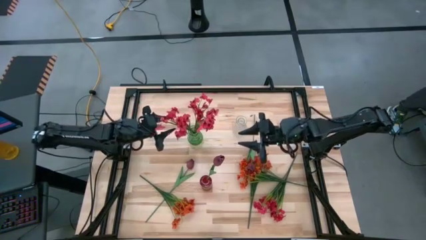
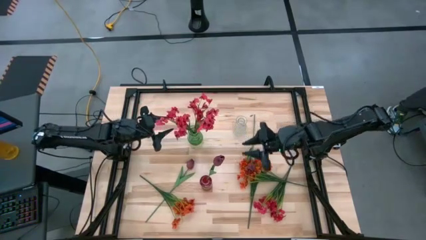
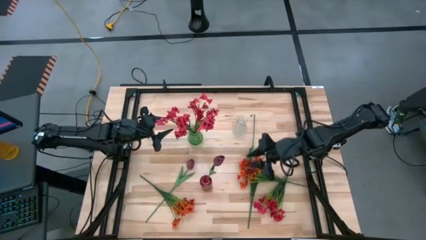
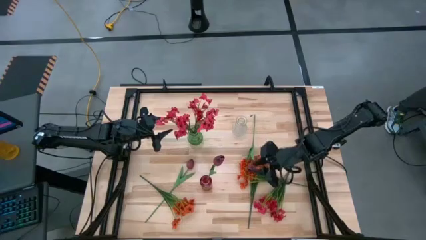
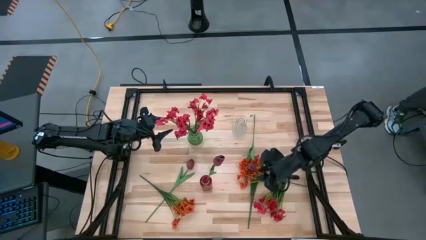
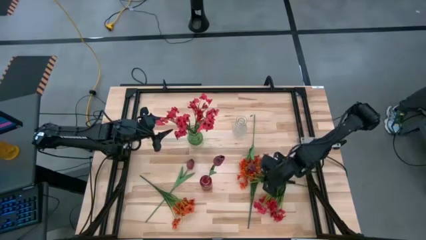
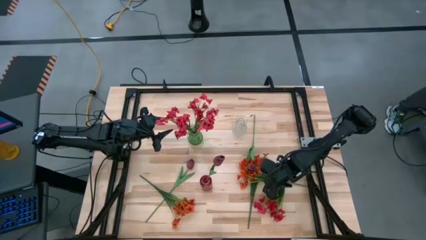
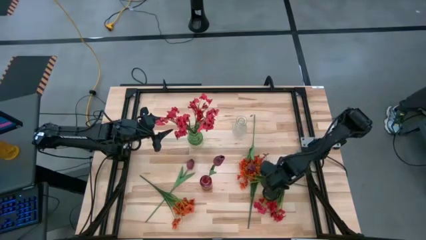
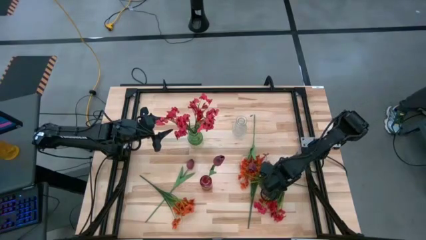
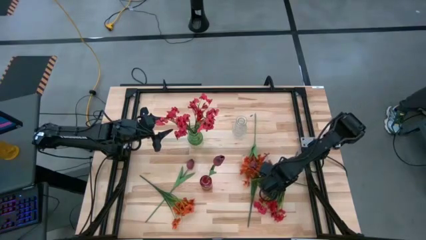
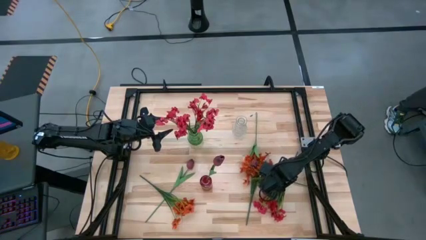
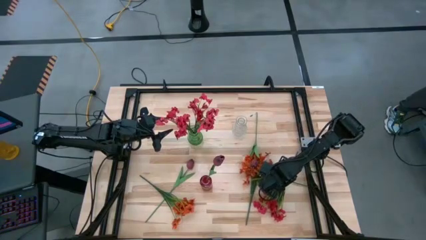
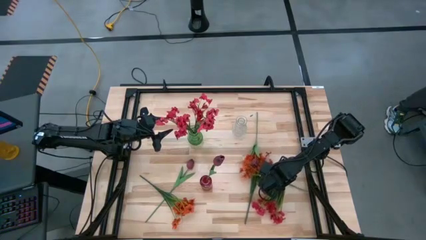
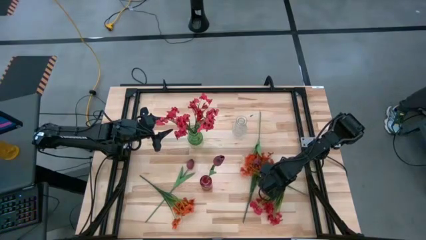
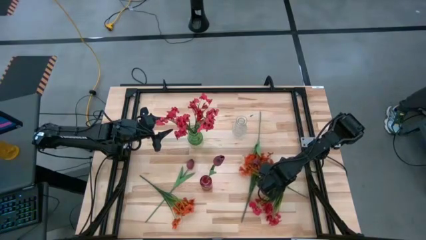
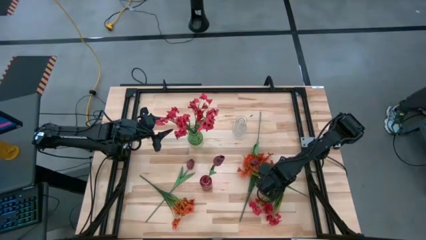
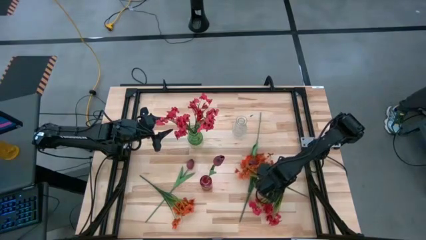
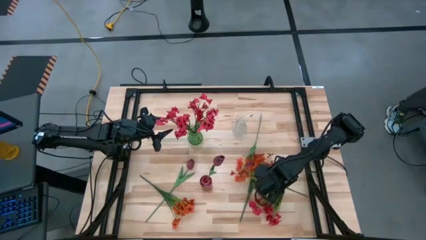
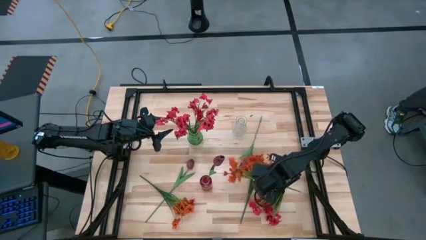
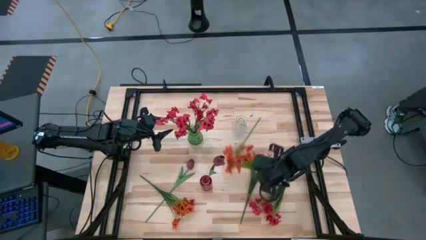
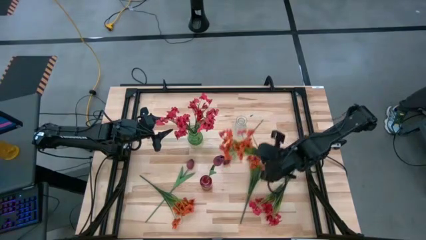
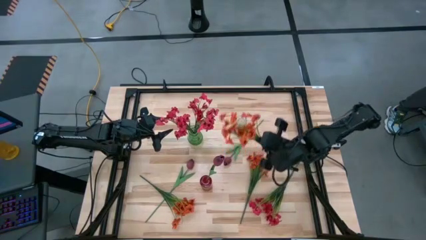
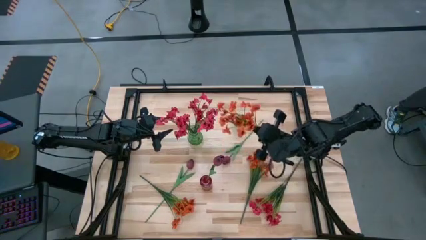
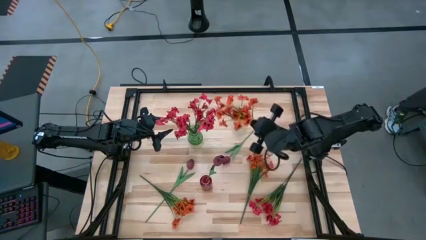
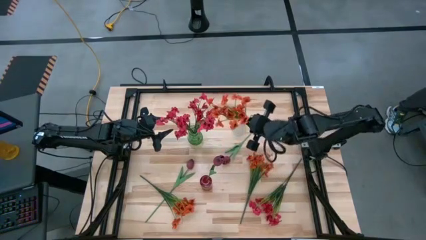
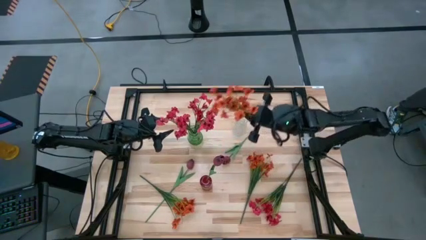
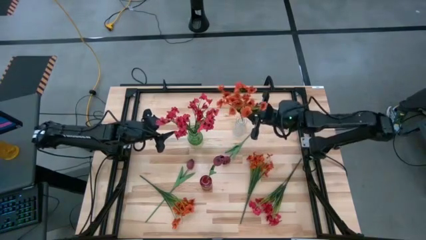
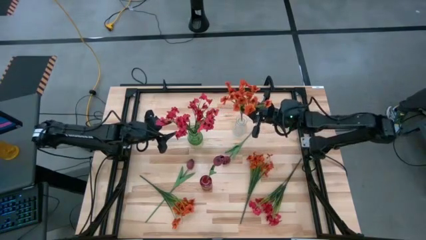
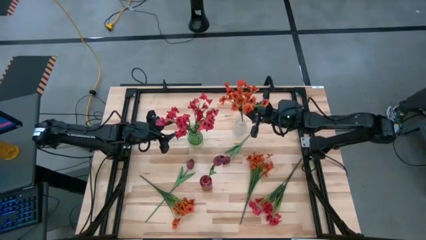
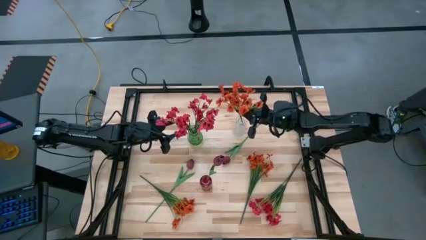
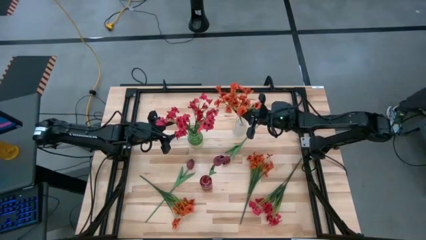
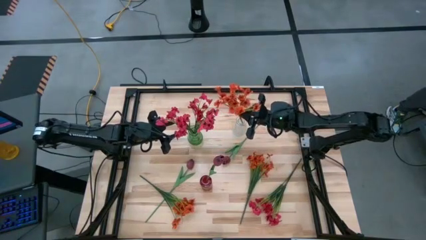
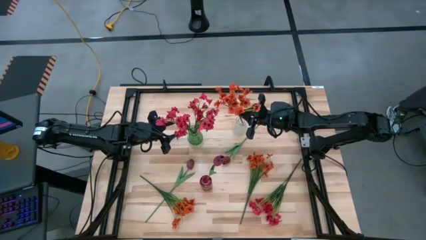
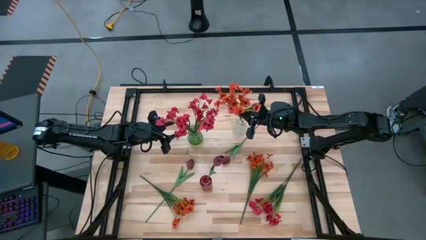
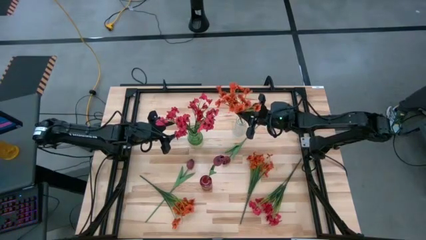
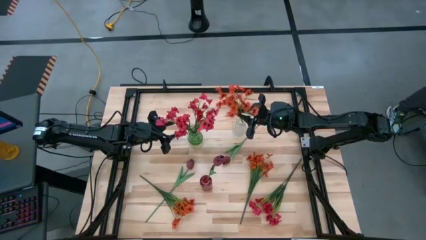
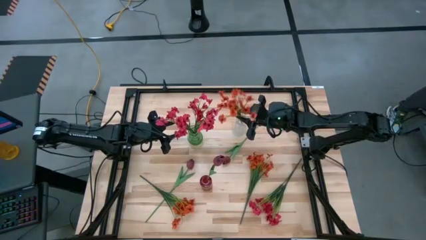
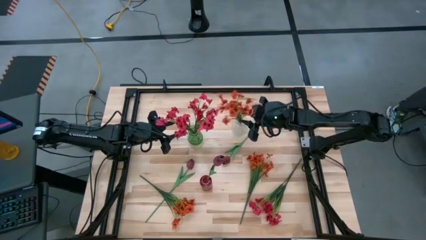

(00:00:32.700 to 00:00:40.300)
Task: Sort flowers into vase by color
Put the right orange flowers into the transparent vase

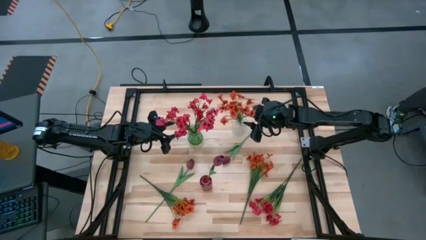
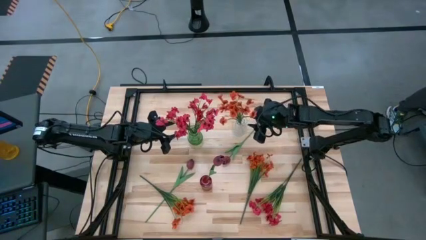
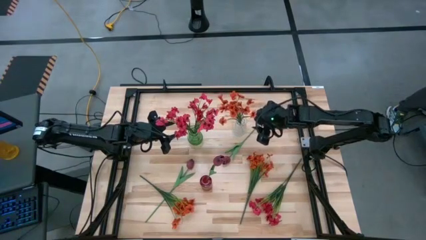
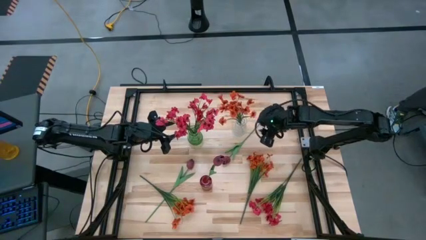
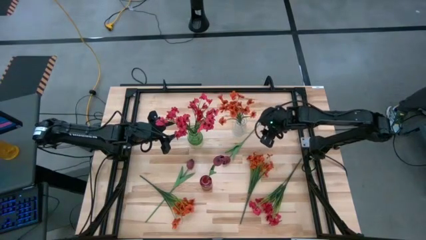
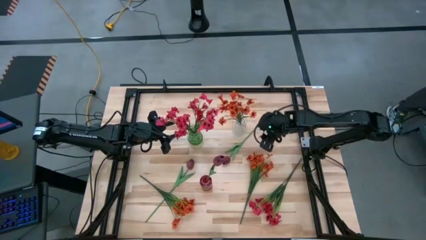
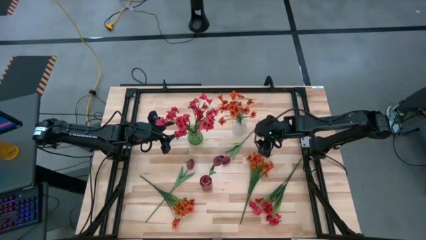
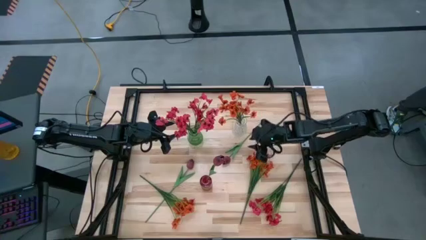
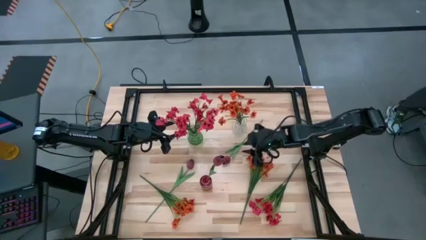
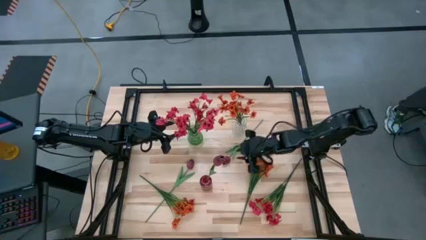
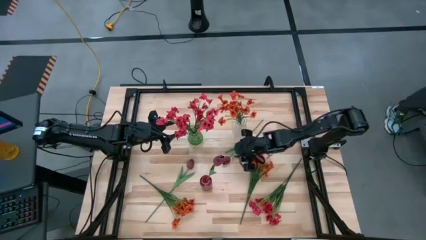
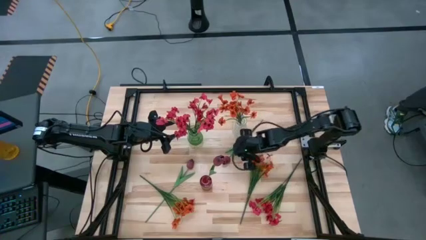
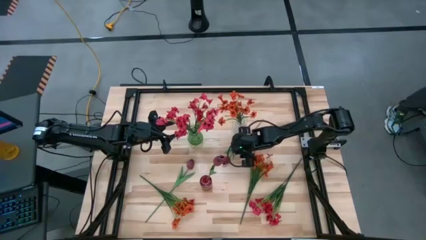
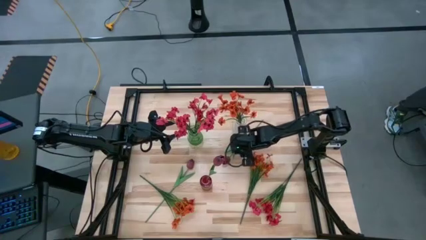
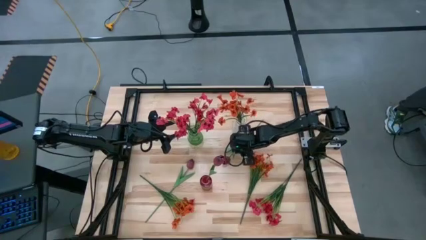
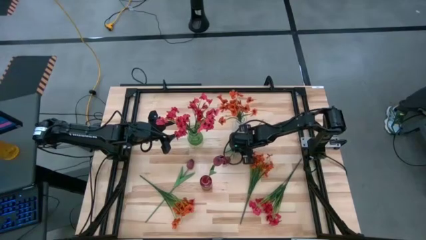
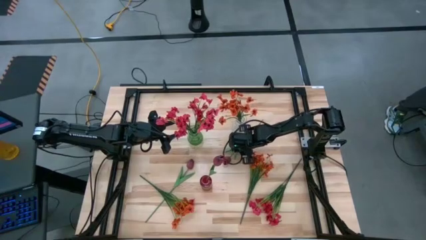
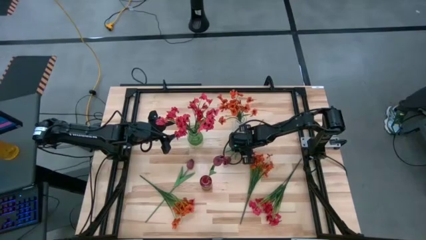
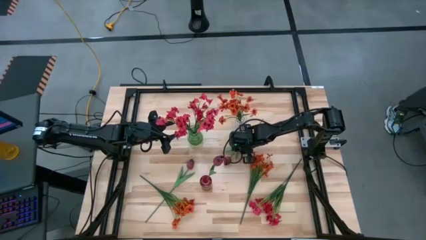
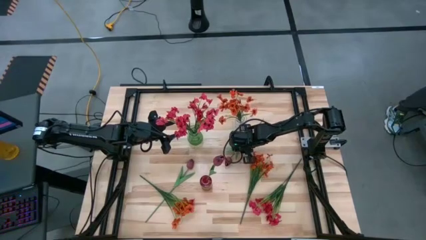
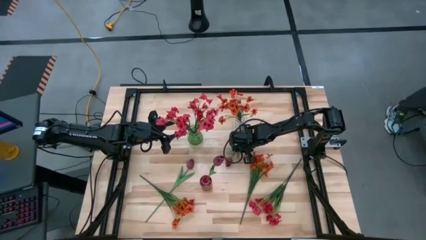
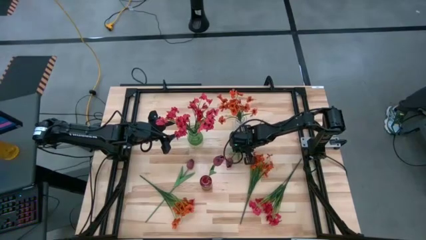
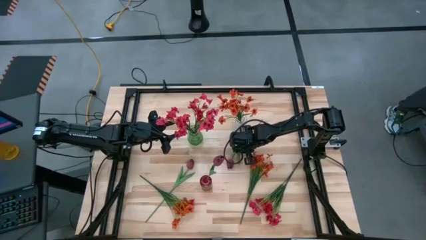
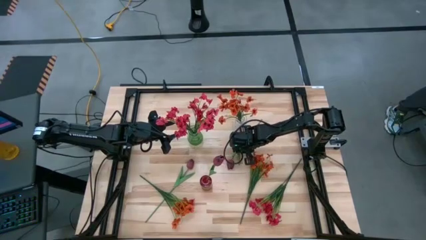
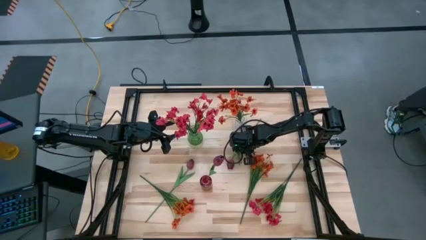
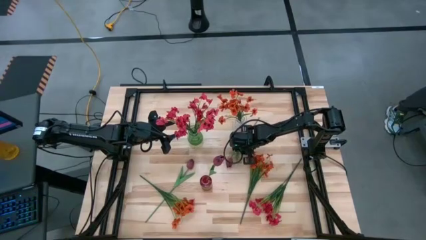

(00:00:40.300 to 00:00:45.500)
Put the red flower into the red vase

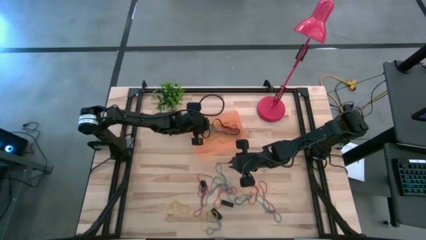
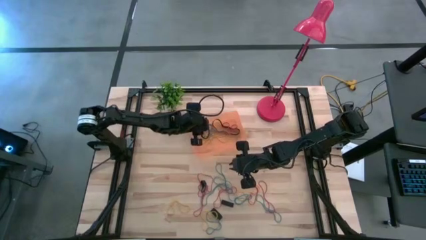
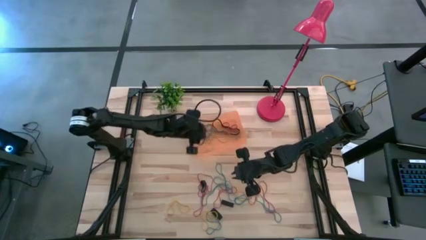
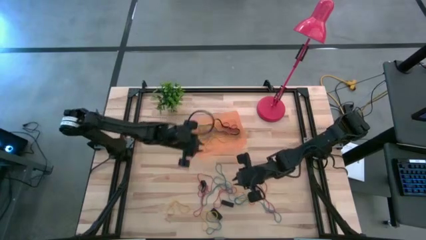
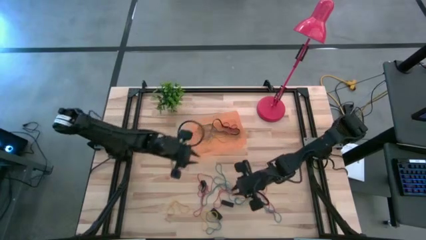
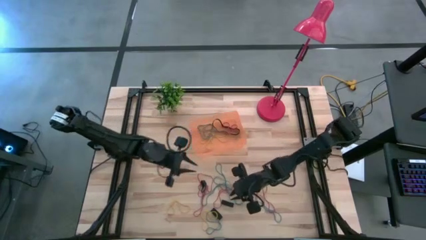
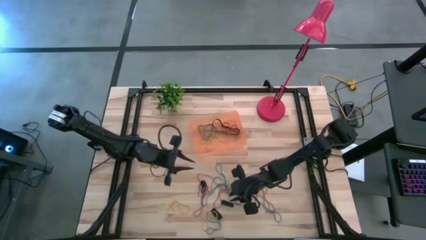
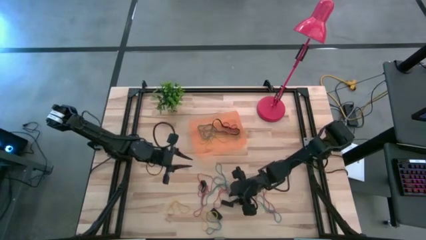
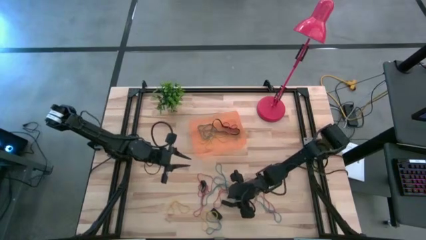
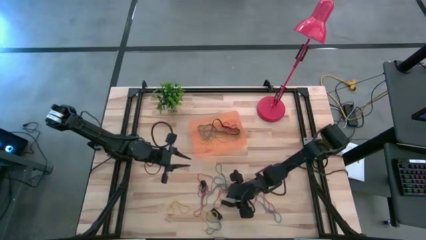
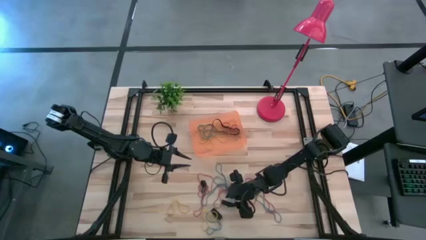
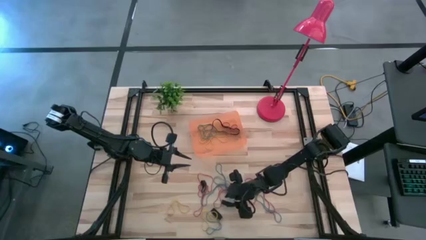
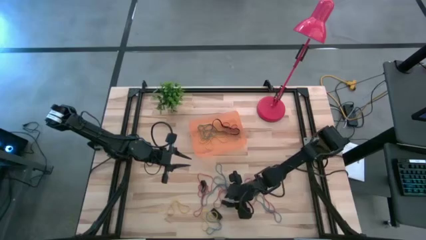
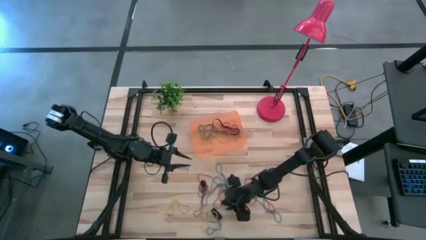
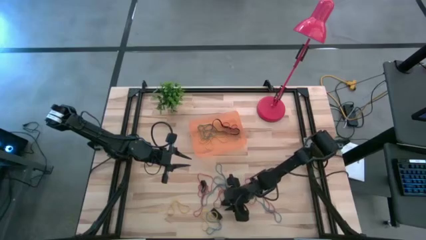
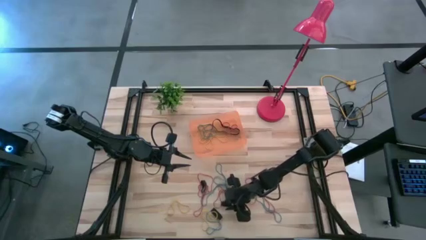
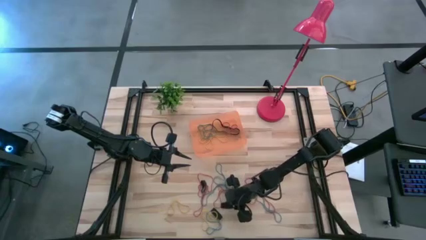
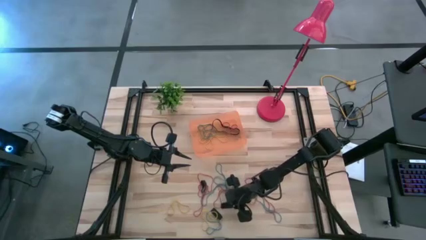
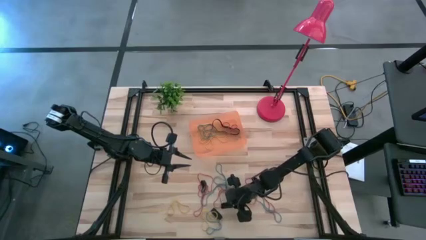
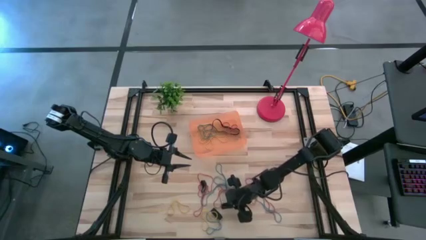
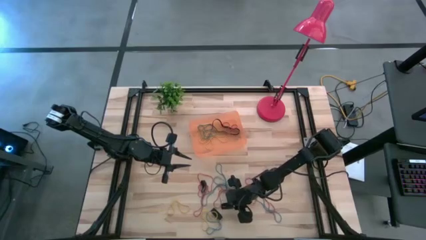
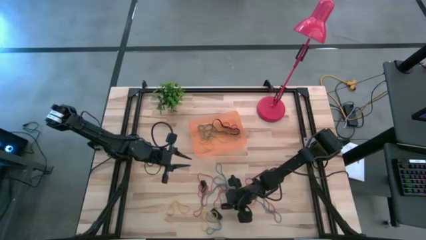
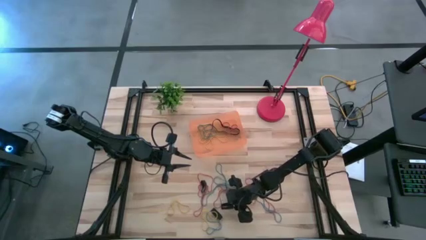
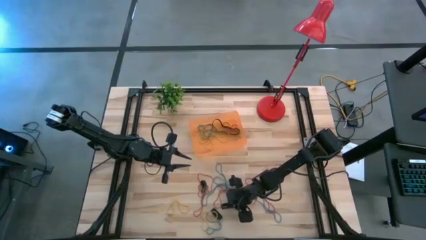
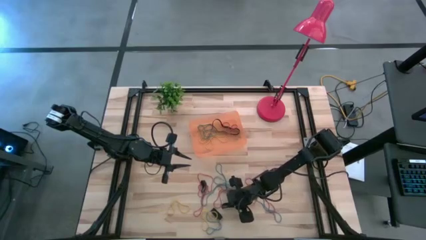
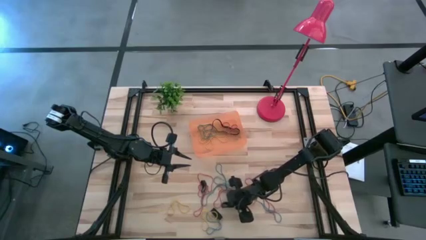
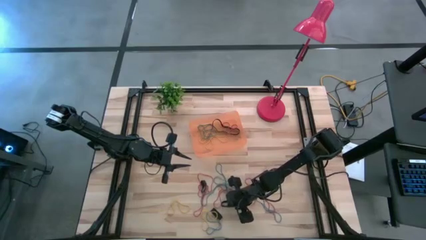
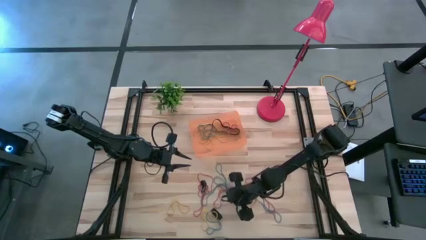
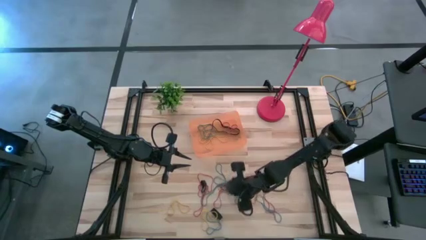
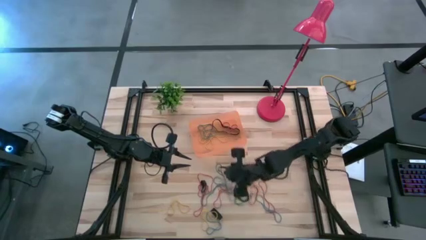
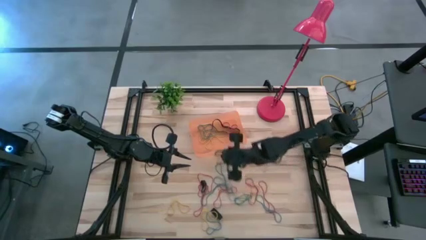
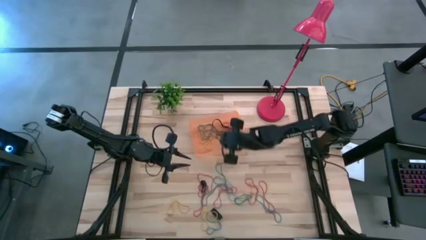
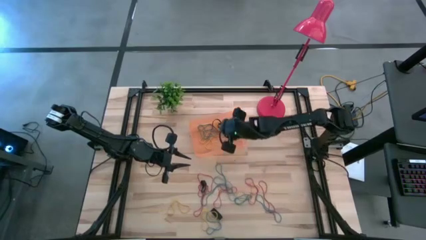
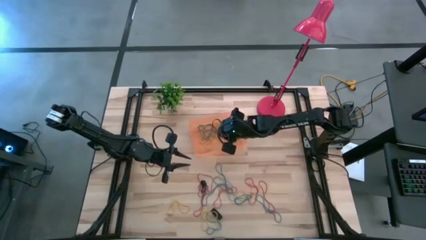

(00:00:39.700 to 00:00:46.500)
Task: Pick and place rubber bands into bin
Put the black rubber band into the orange bin
